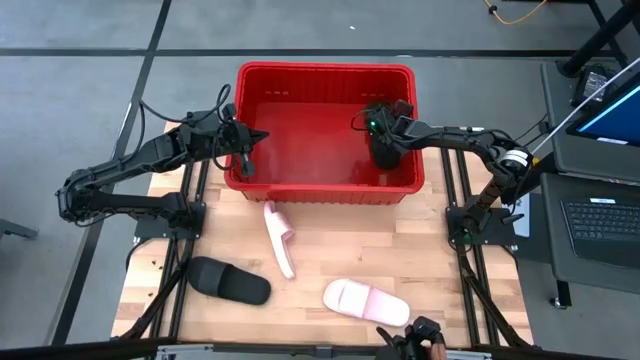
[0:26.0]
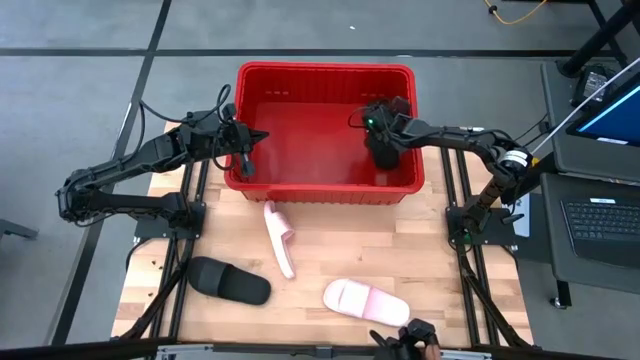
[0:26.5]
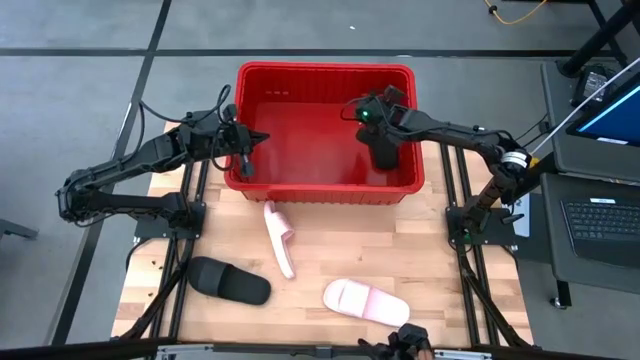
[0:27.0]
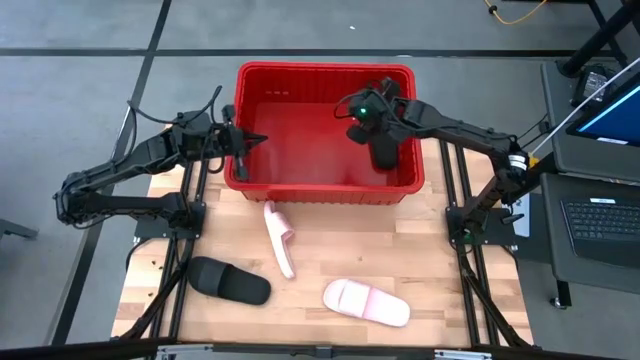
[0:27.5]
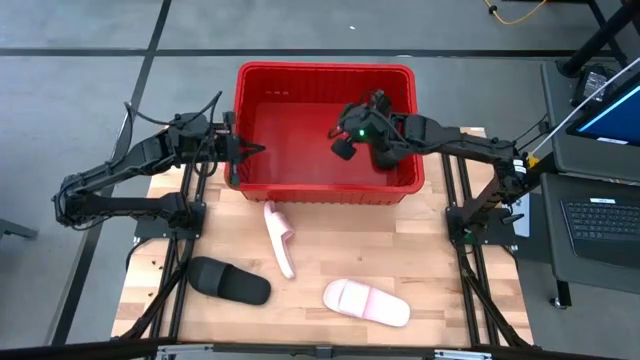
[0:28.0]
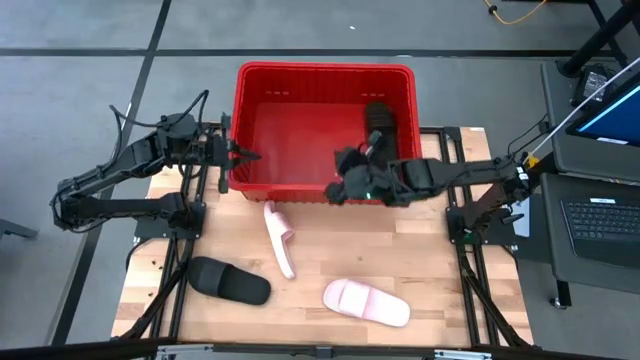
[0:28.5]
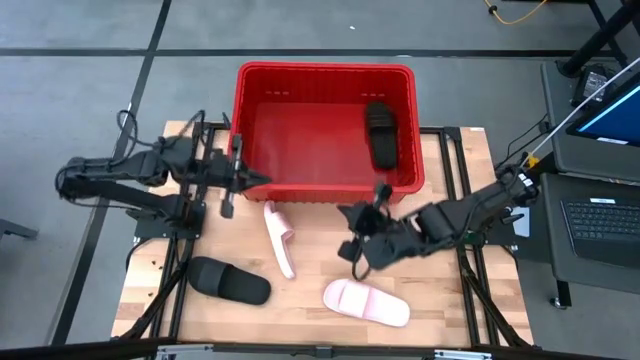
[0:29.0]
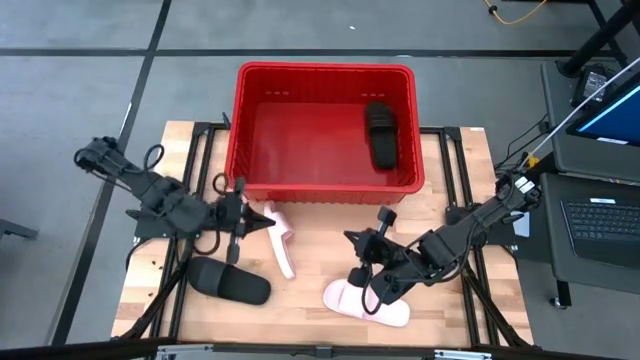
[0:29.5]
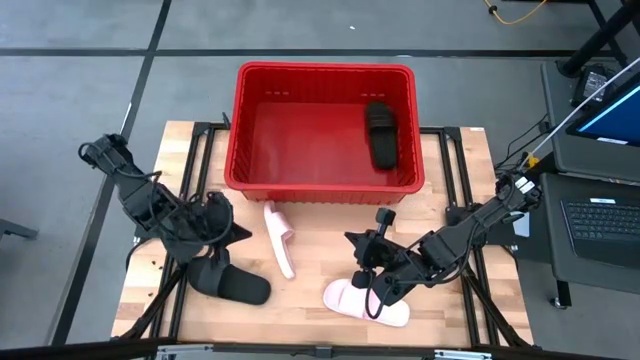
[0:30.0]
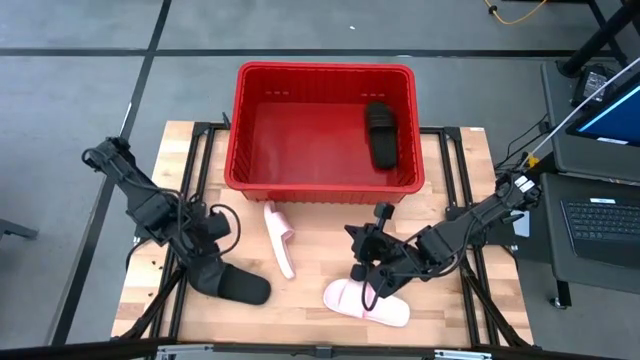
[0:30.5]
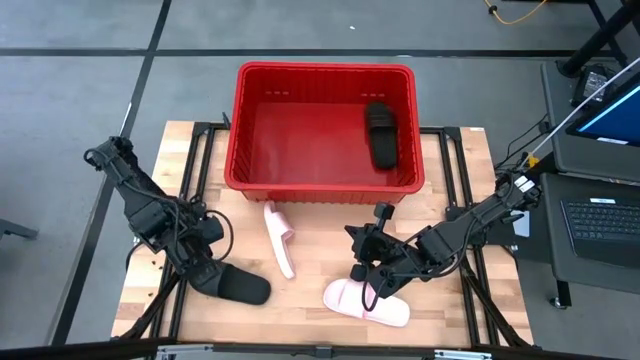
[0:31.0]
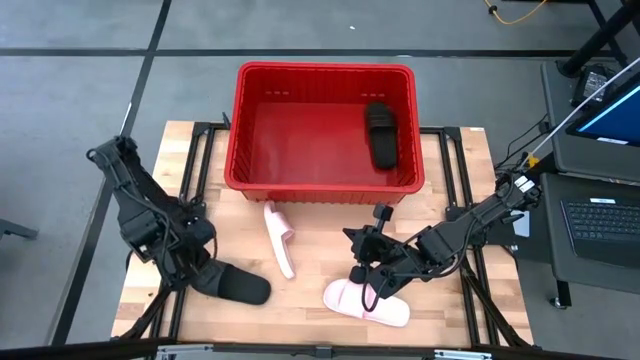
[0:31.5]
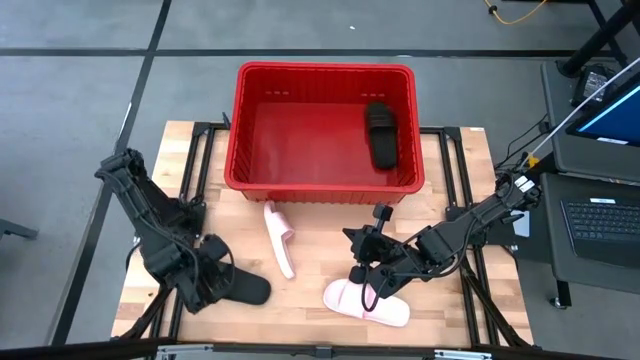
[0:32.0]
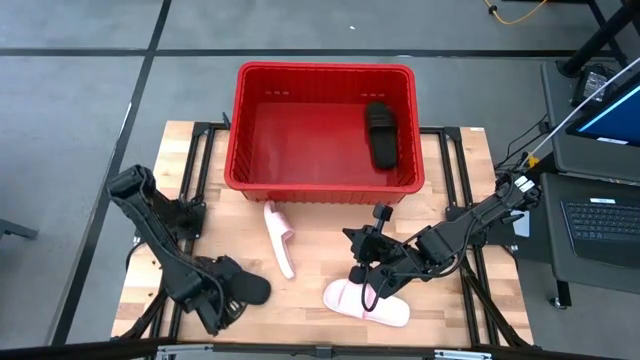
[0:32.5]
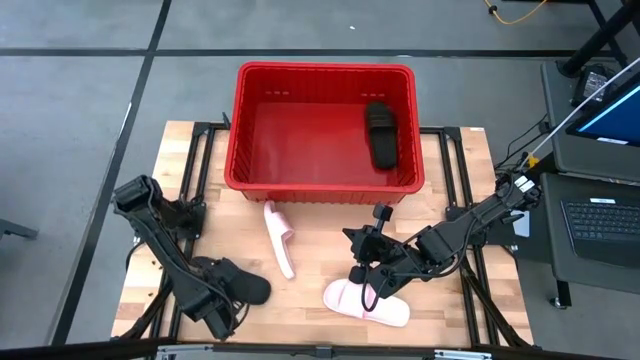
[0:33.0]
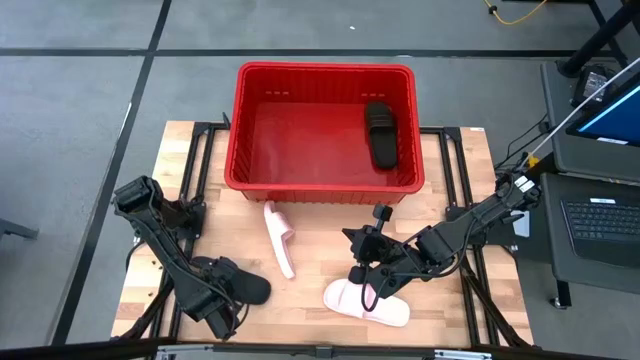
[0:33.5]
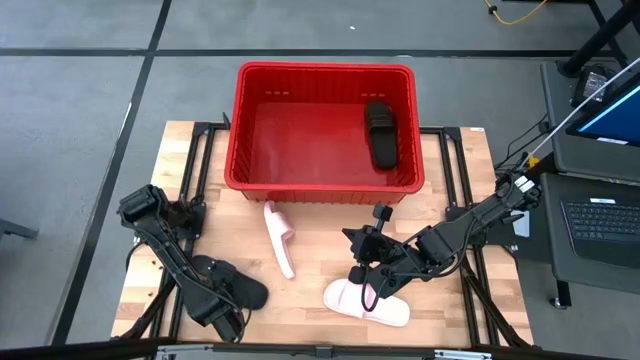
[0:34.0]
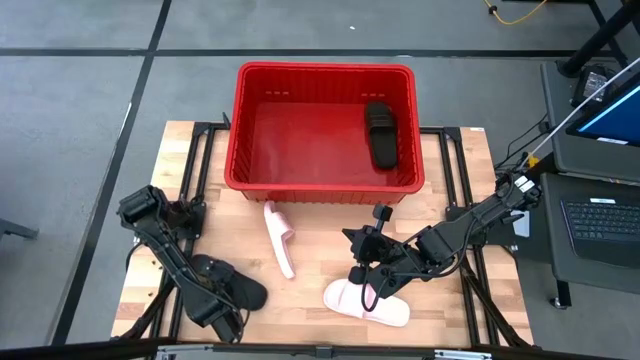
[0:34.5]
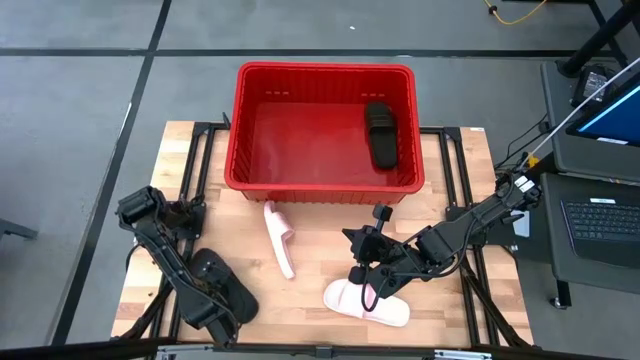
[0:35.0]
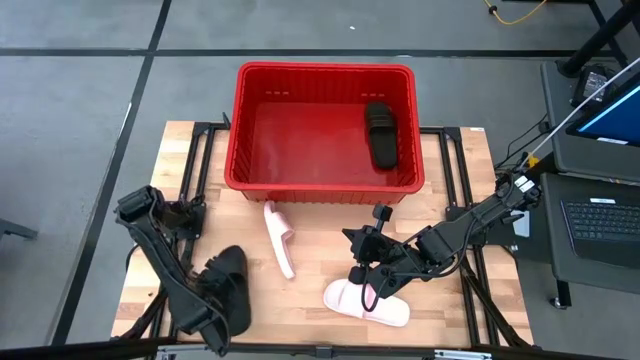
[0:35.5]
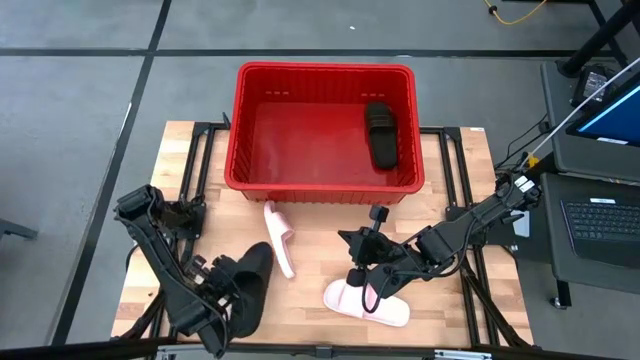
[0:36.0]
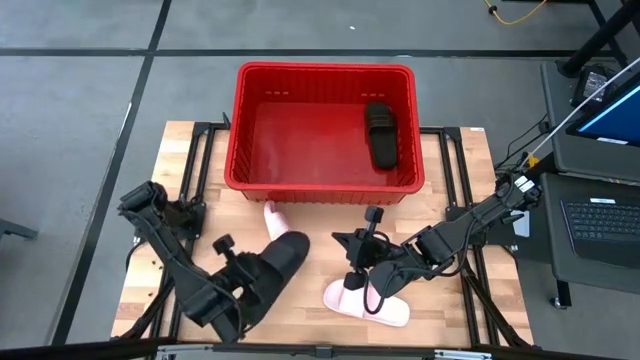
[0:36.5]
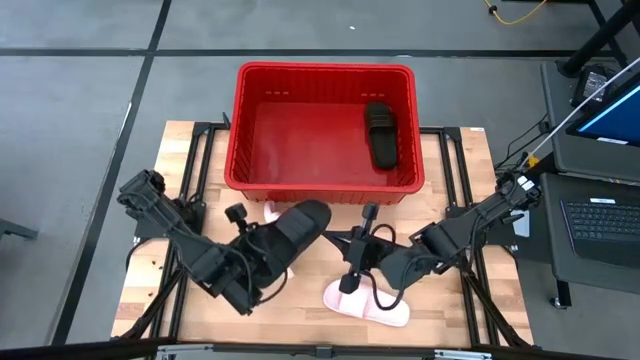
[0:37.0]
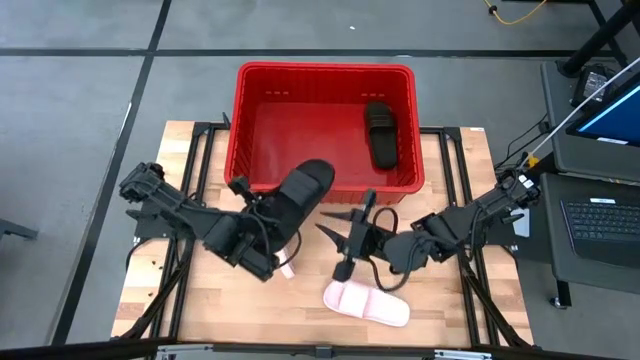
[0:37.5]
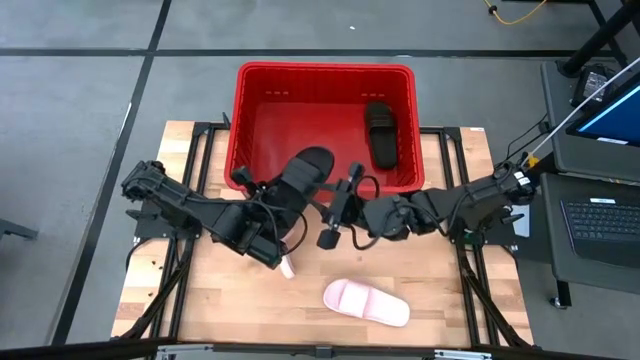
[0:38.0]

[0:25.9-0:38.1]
Task: Pick and place slides into bin
Put the black slide into the red bin

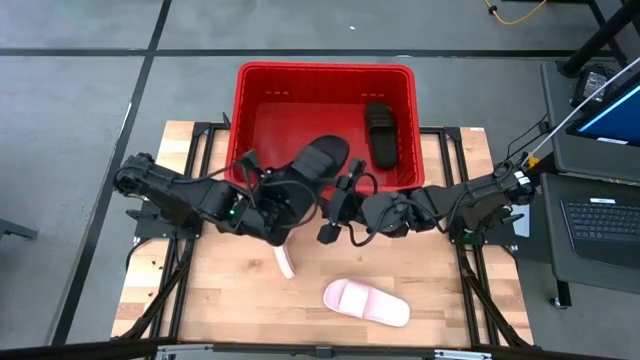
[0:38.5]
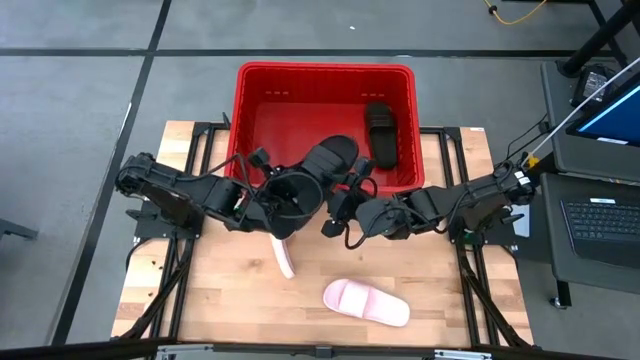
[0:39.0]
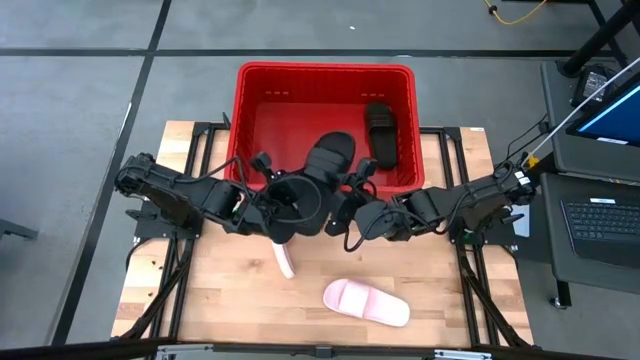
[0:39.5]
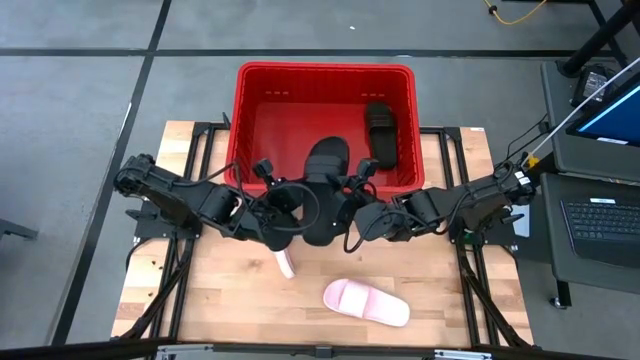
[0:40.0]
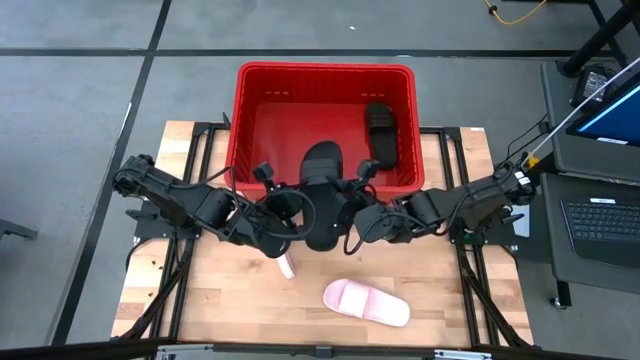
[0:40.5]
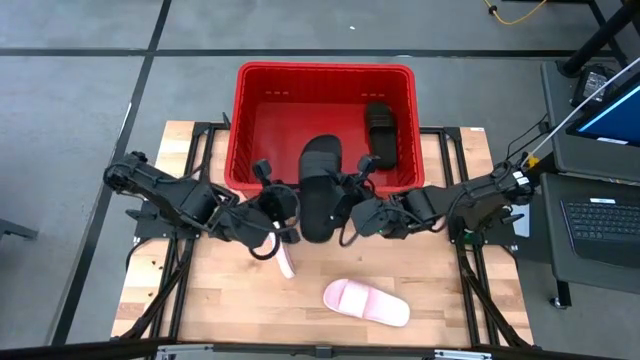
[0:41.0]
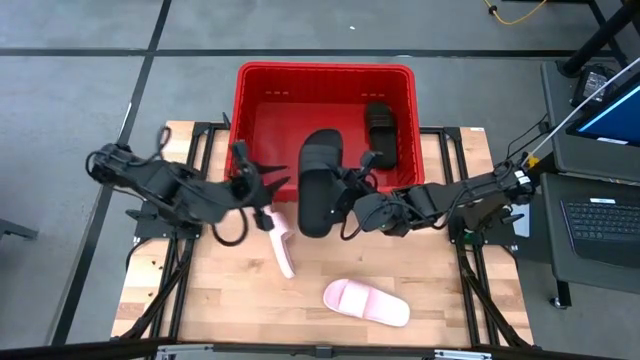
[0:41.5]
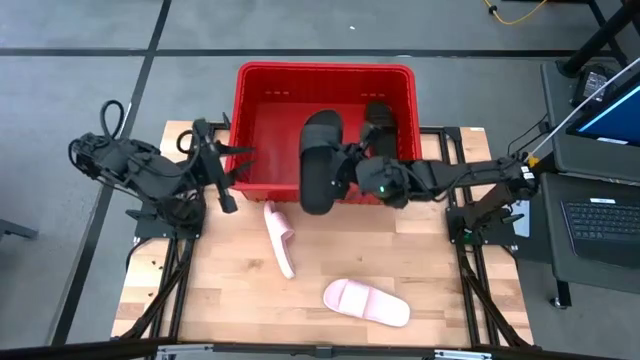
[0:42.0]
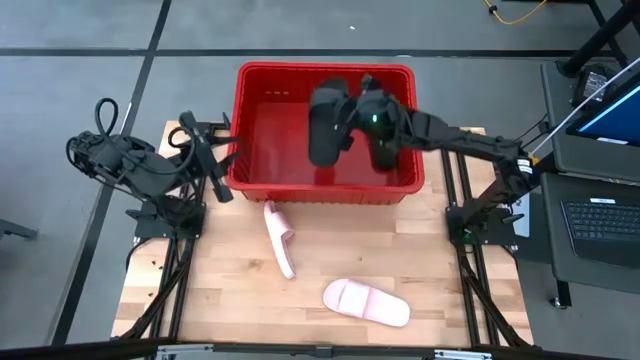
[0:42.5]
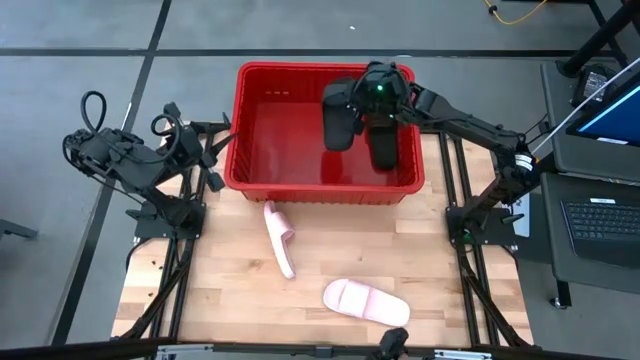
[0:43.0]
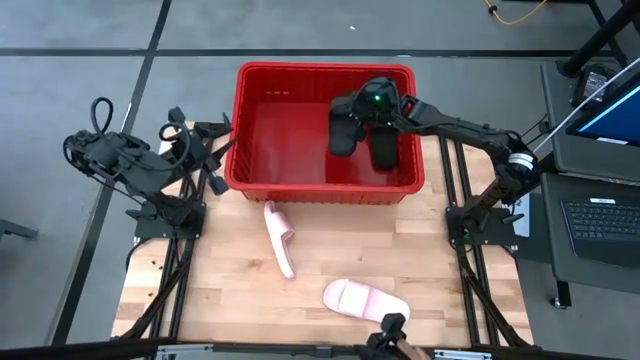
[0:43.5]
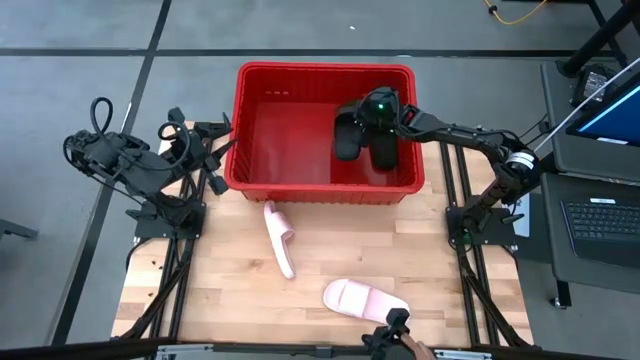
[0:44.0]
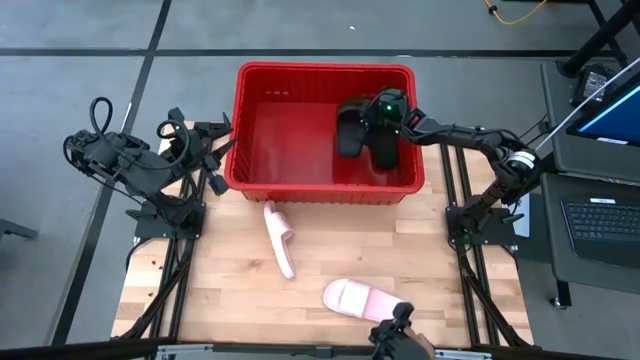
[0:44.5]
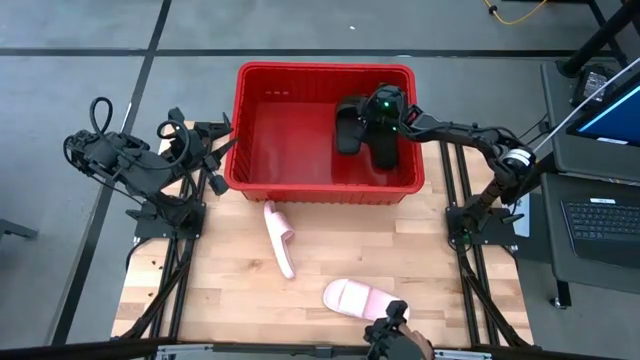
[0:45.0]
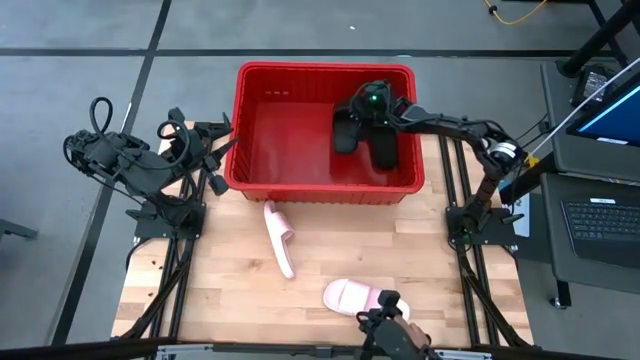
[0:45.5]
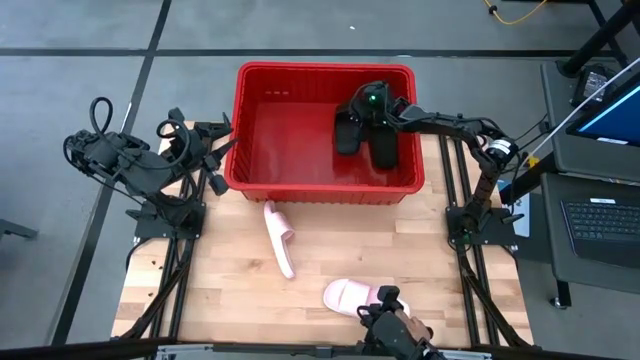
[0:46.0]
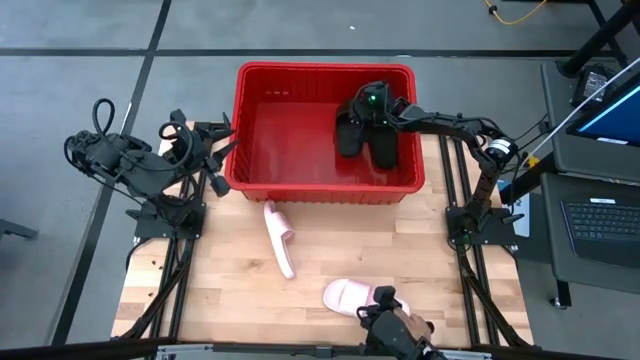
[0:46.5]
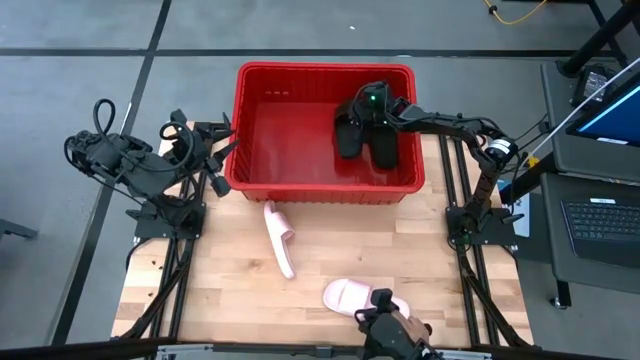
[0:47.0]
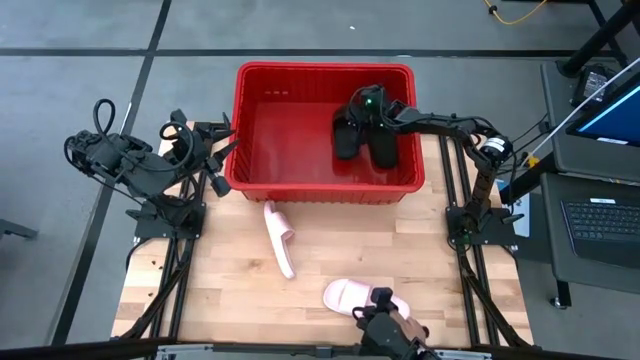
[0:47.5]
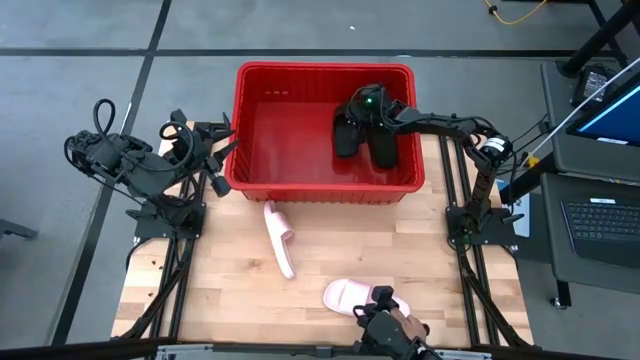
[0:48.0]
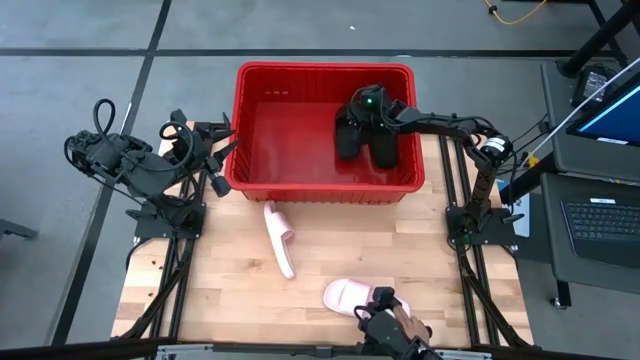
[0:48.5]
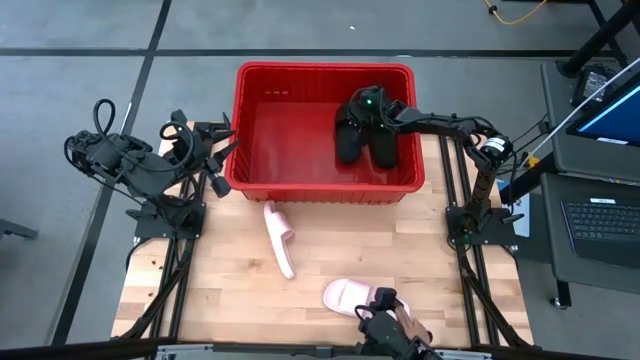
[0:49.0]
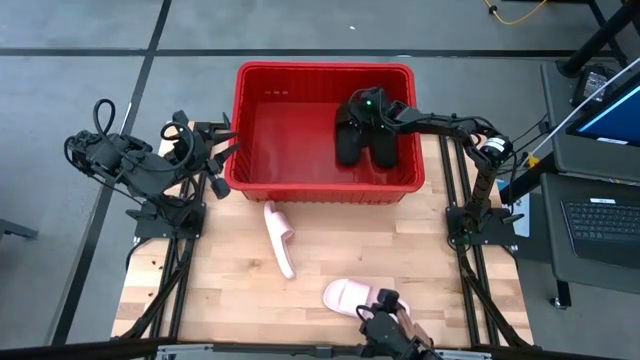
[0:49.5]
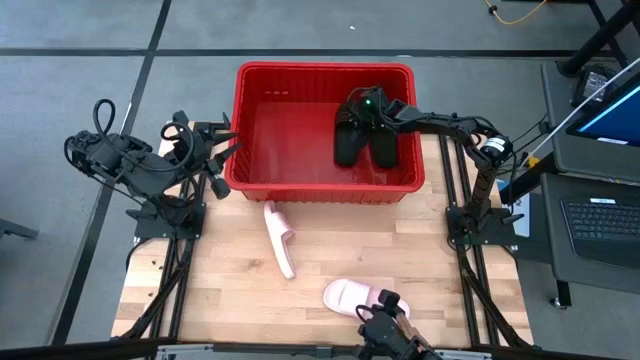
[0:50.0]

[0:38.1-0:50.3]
Put the black slide into the red bin
